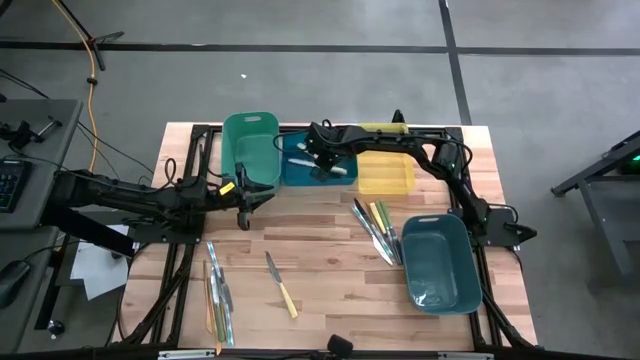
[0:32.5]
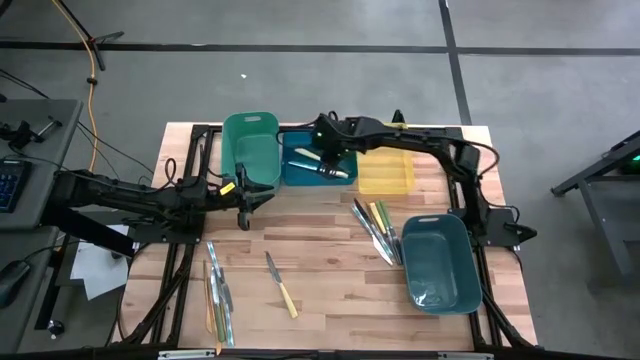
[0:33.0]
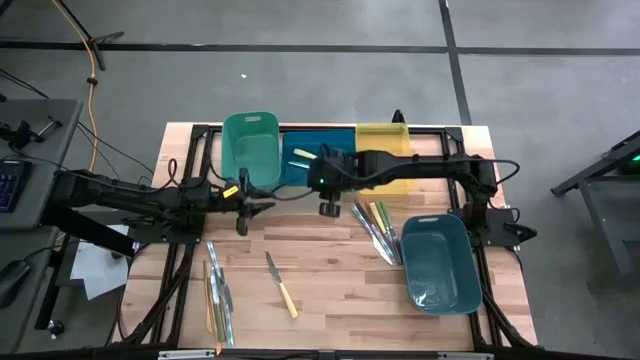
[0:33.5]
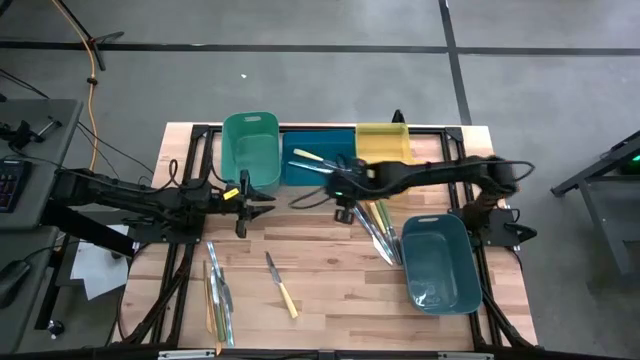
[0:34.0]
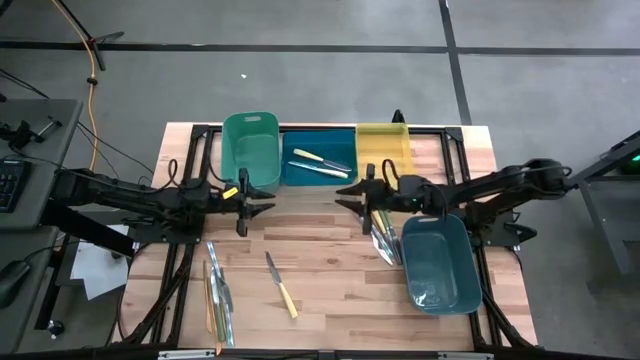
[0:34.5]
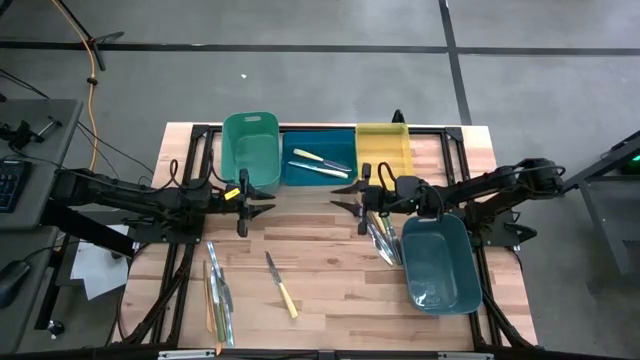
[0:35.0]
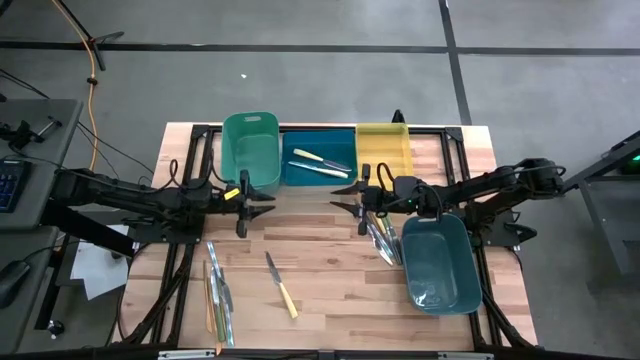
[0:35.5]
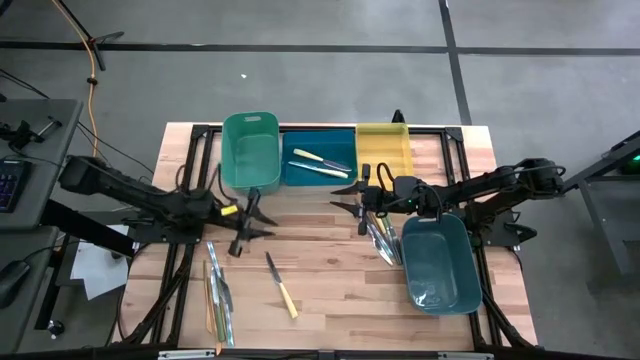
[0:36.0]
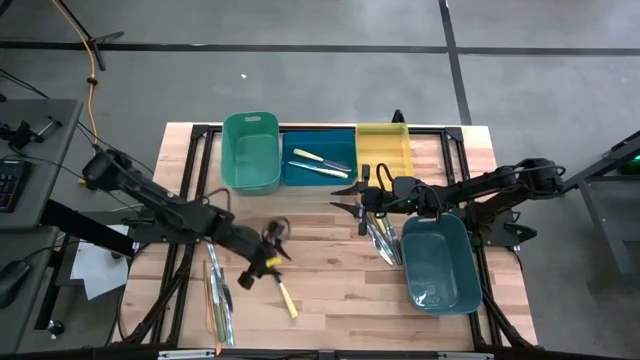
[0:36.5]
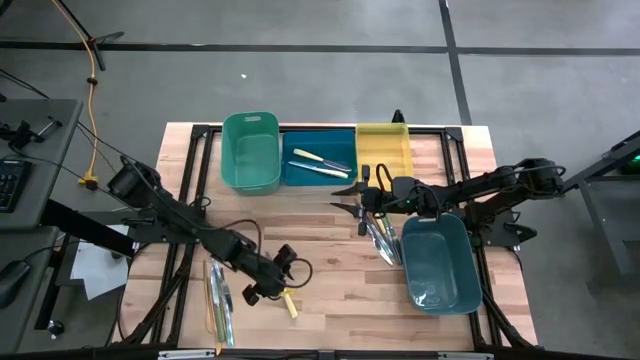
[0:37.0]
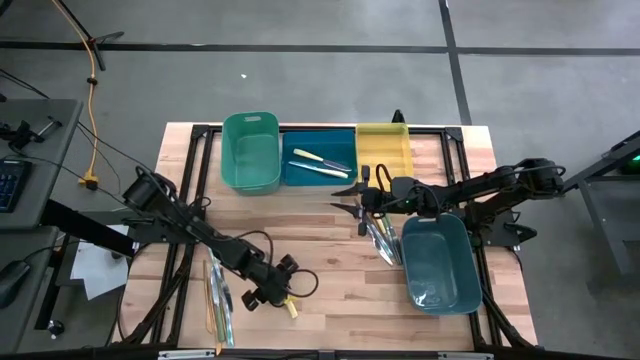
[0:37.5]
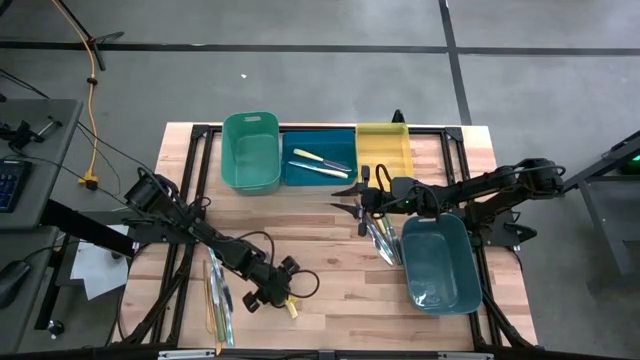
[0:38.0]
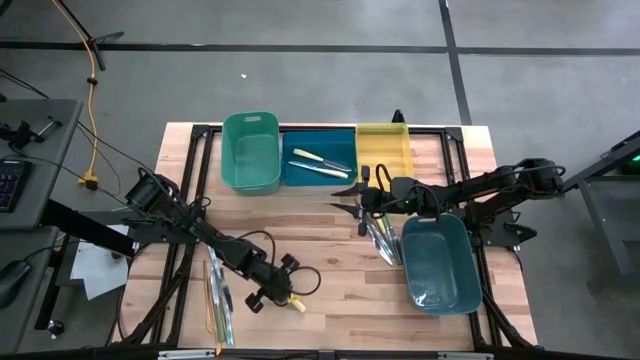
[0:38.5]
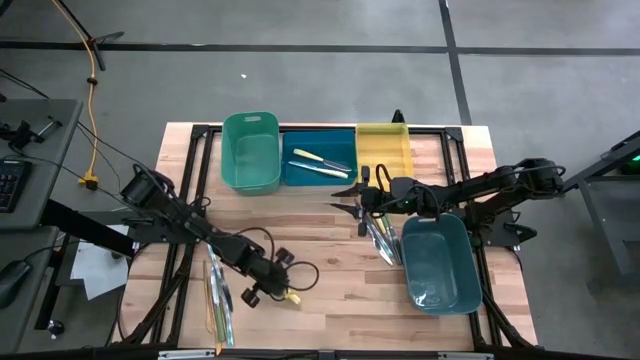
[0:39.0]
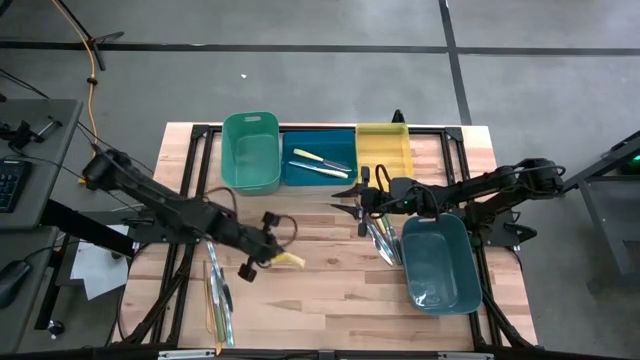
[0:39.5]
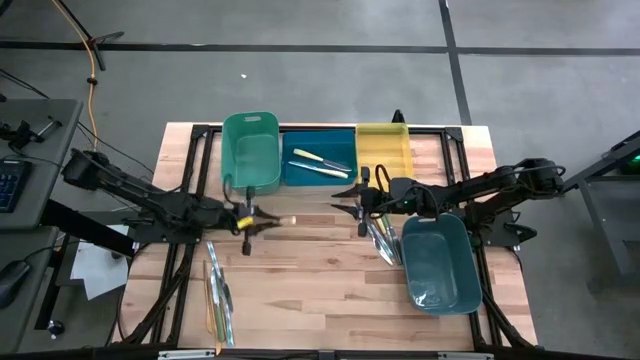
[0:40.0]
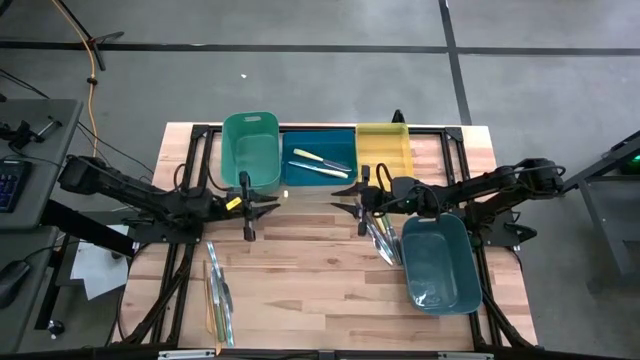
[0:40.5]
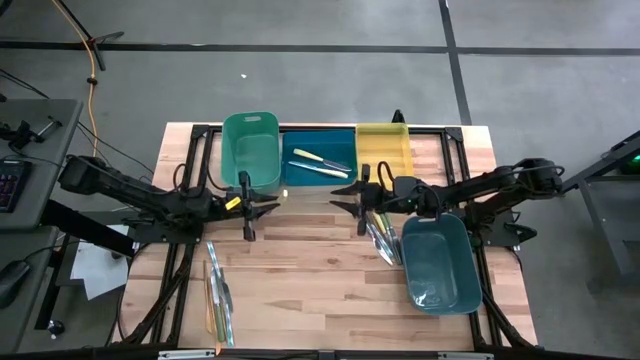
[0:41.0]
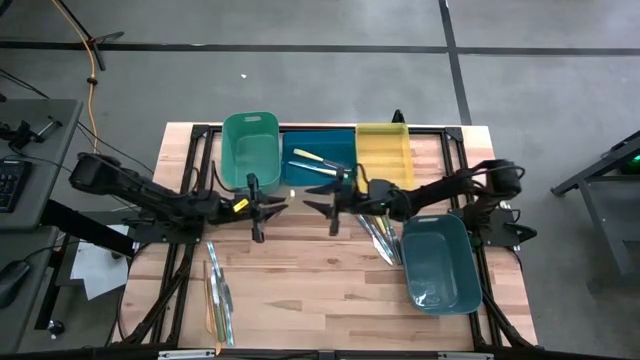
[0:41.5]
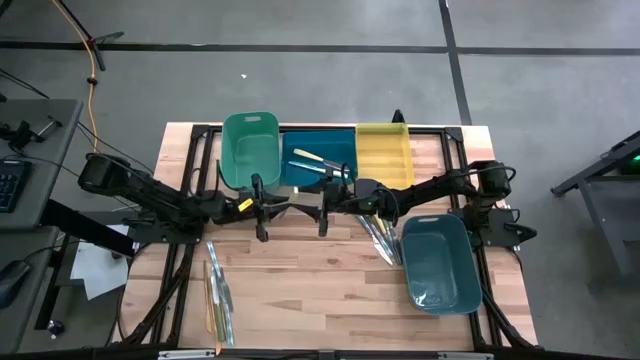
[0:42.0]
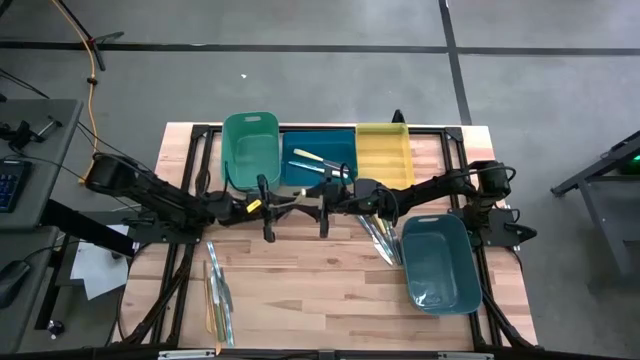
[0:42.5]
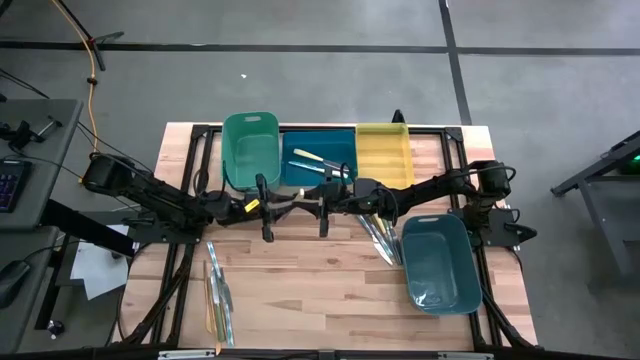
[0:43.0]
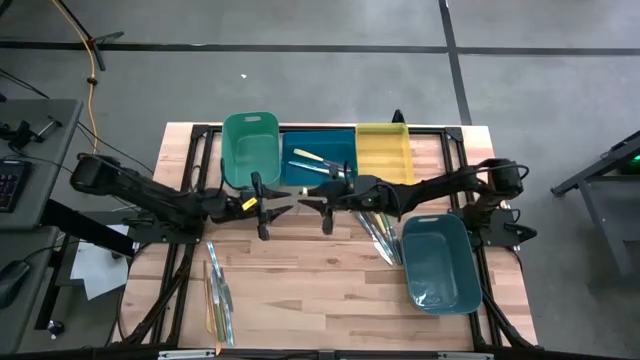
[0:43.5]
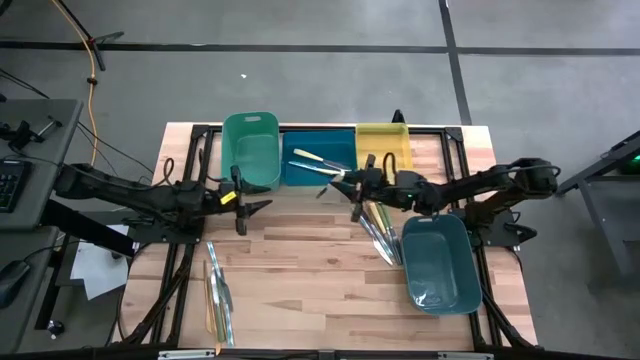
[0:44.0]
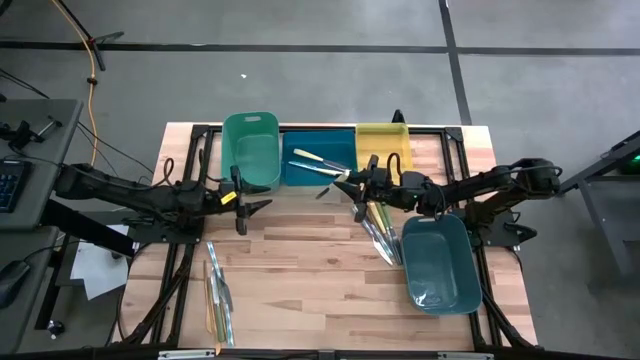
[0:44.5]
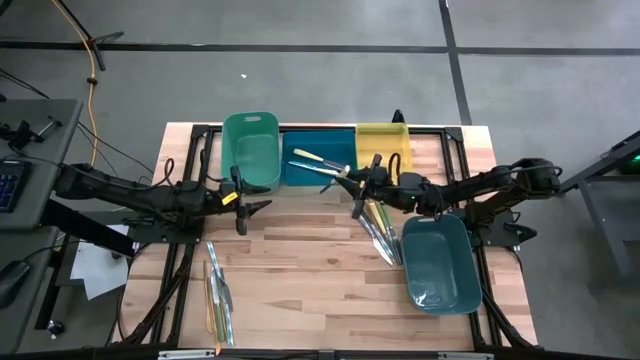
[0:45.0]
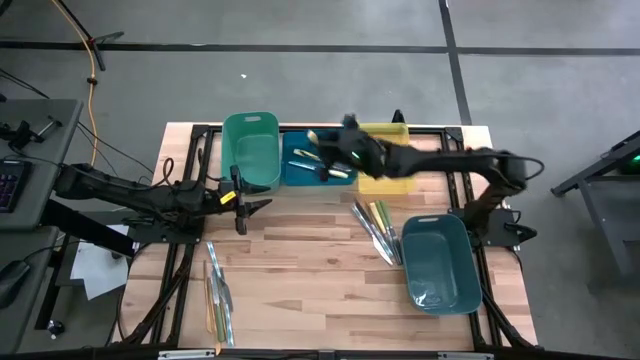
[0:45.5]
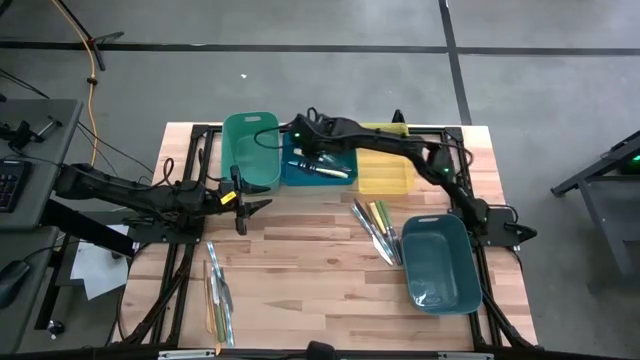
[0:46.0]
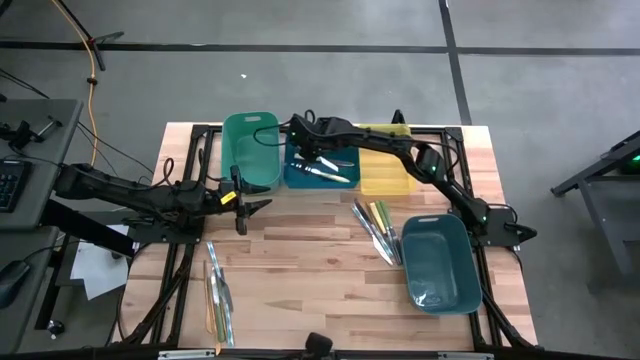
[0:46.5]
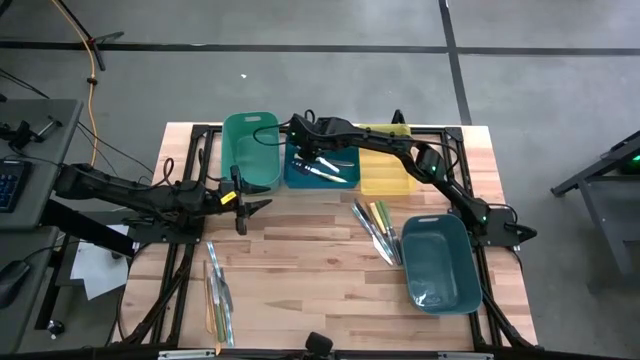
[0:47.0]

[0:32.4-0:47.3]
Task: Sort silverware by color (type)
Put the yellow knife into the blue bin
